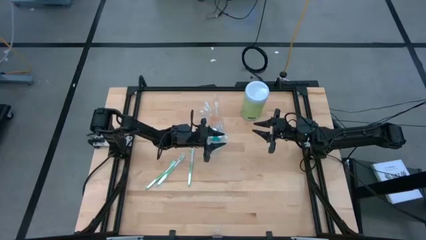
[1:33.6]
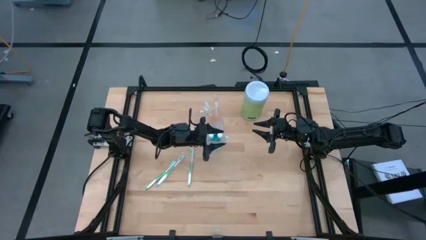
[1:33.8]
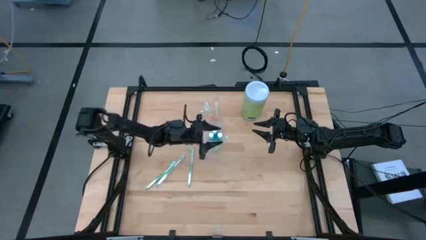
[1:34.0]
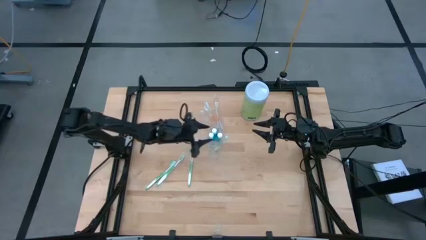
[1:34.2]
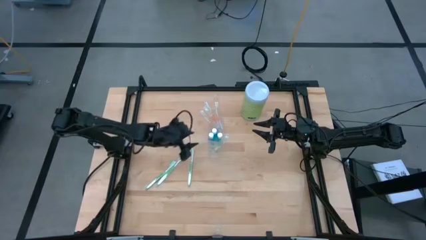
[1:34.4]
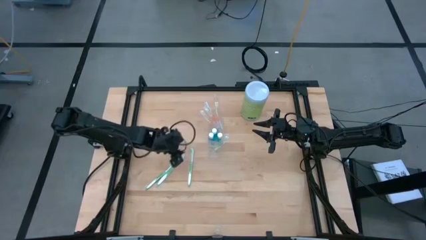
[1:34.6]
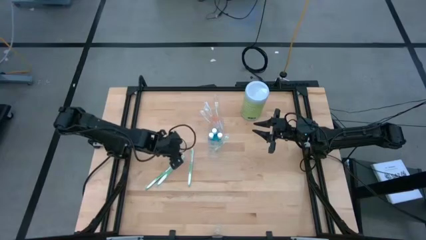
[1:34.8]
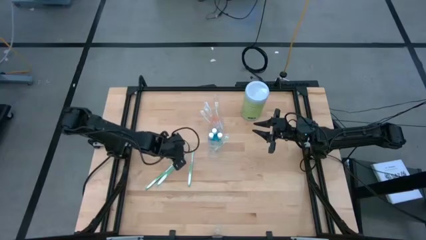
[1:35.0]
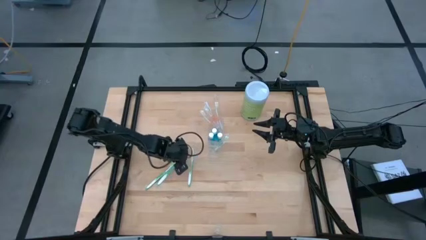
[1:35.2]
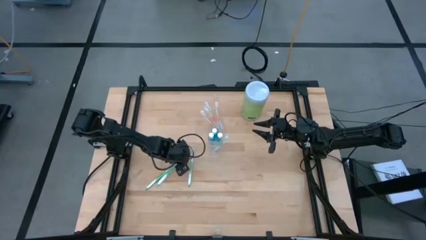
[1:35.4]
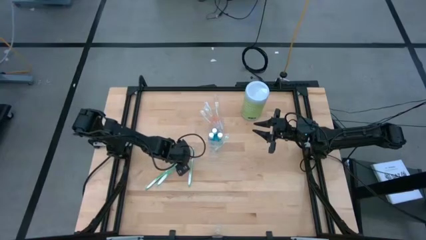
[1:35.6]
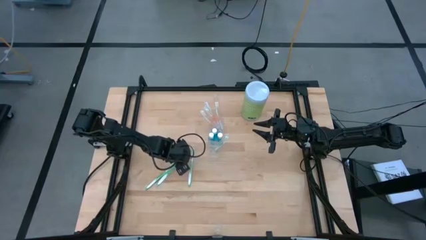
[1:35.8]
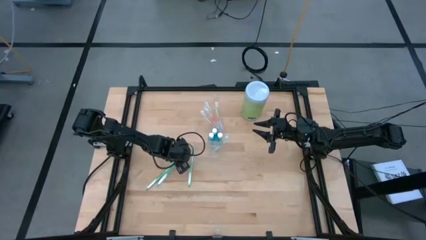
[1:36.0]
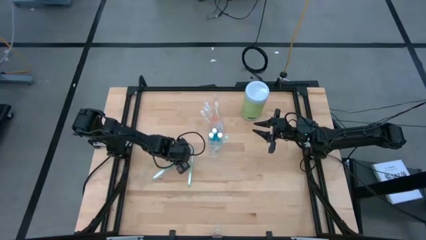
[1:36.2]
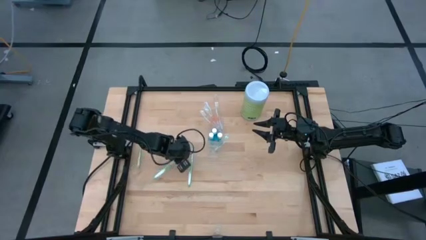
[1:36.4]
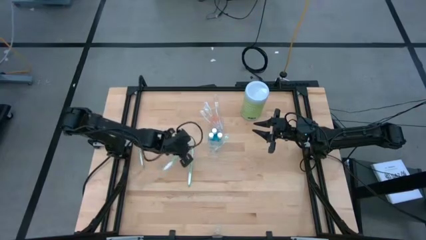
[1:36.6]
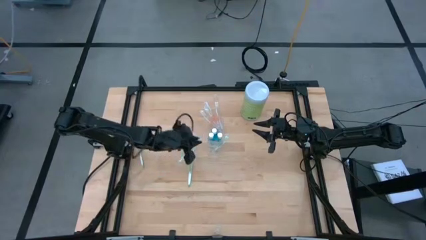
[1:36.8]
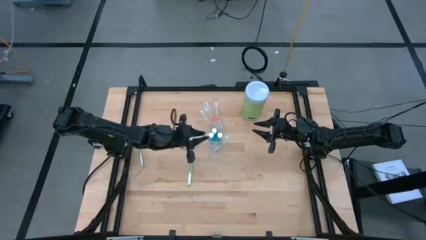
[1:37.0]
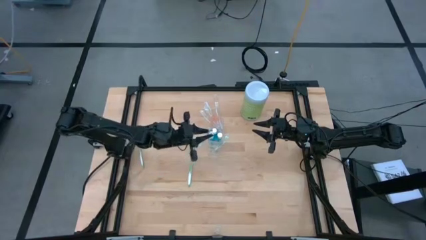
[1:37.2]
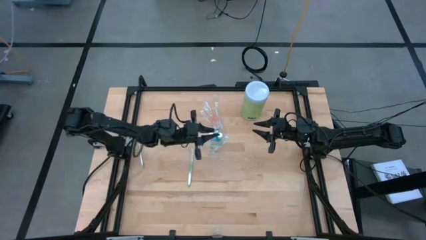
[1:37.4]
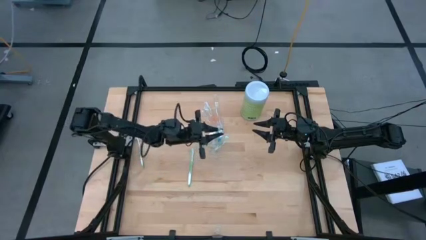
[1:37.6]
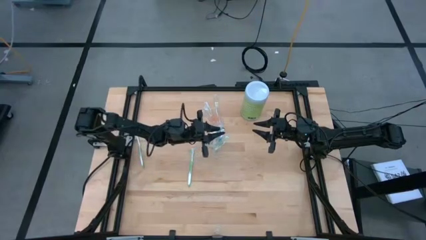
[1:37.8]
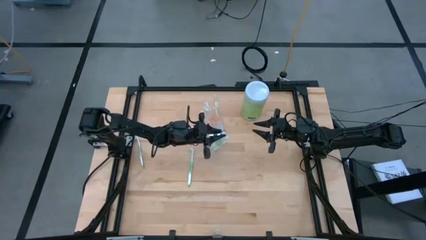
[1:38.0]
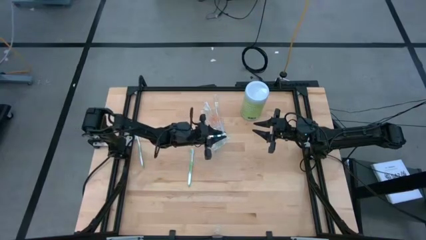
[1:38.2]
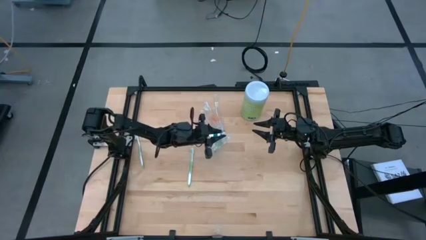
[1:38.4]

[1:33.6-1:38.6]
Task: Pick & Place toothbrushing station
Put the green toothbrush with the other green toothbrush in the transparent organizer

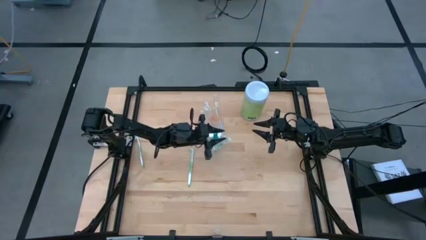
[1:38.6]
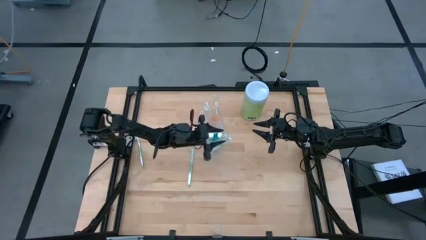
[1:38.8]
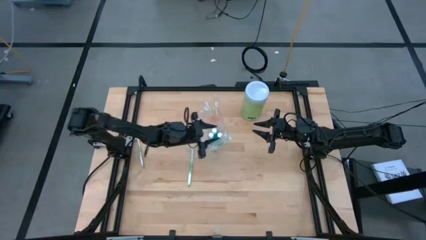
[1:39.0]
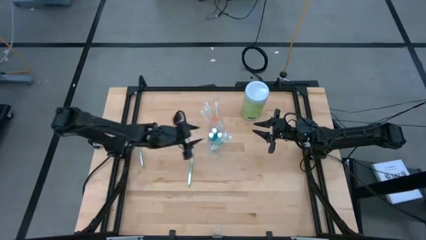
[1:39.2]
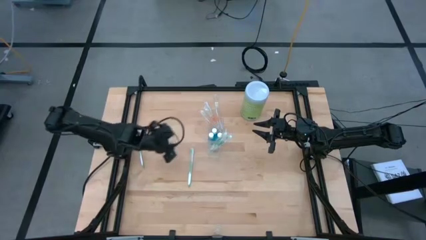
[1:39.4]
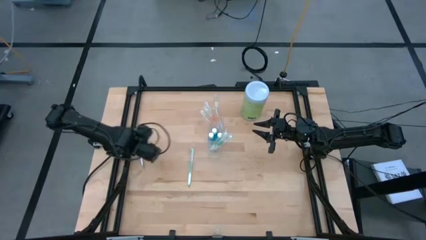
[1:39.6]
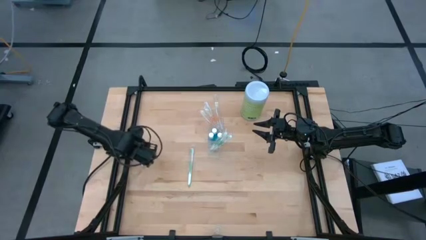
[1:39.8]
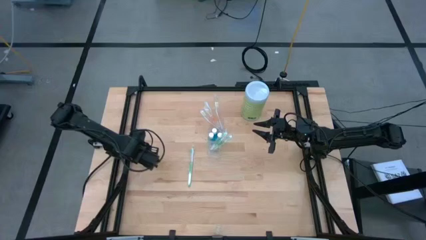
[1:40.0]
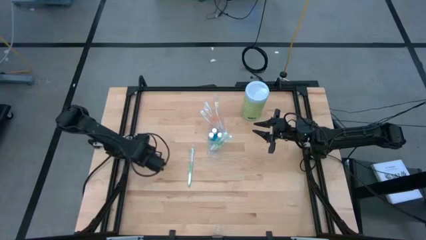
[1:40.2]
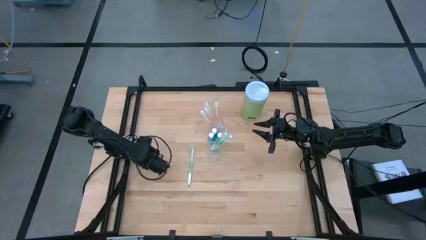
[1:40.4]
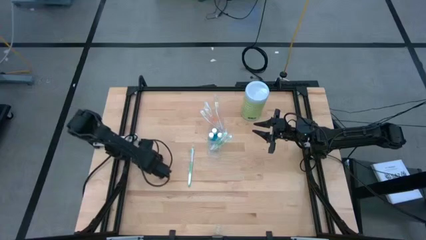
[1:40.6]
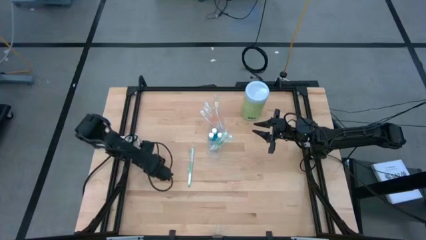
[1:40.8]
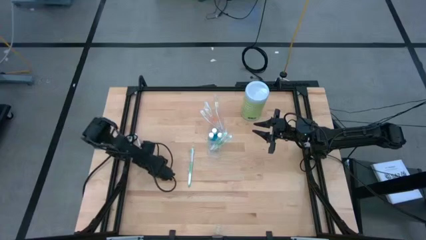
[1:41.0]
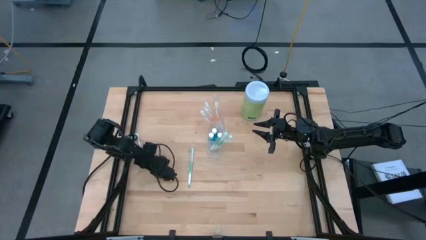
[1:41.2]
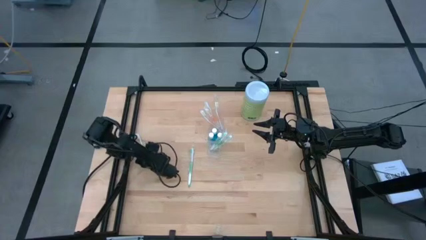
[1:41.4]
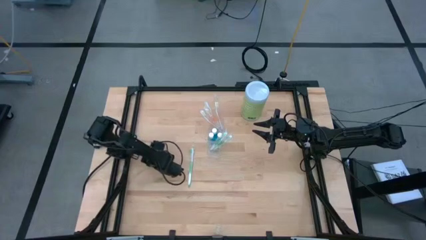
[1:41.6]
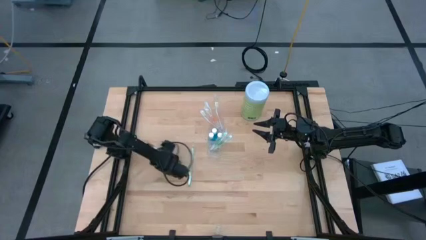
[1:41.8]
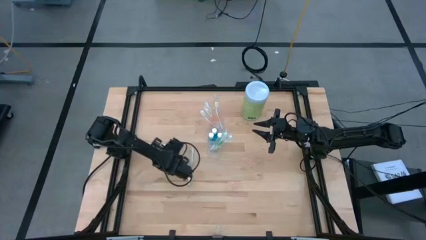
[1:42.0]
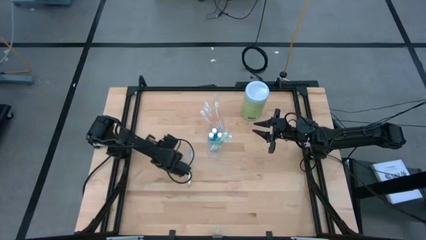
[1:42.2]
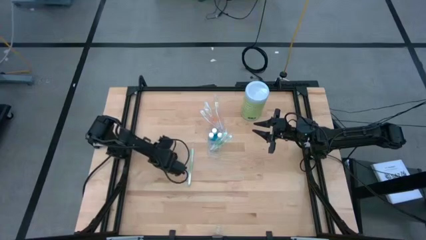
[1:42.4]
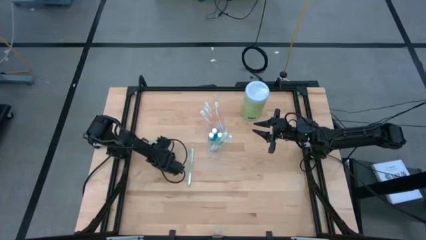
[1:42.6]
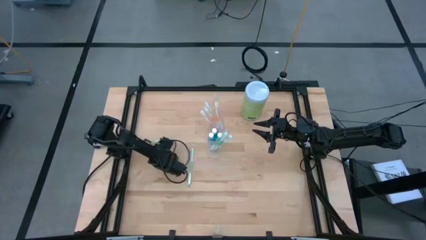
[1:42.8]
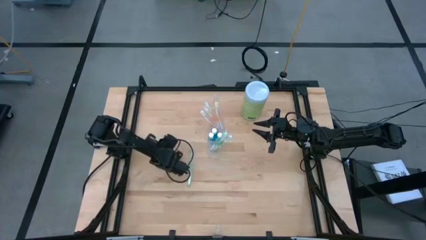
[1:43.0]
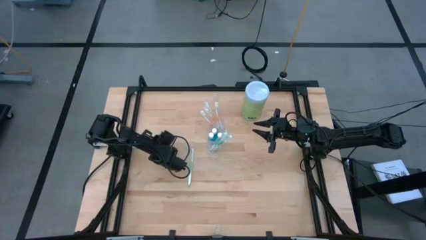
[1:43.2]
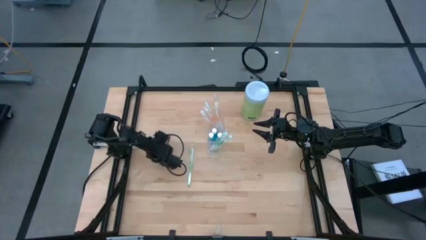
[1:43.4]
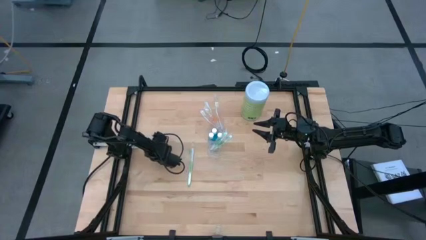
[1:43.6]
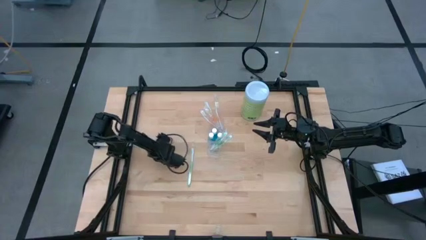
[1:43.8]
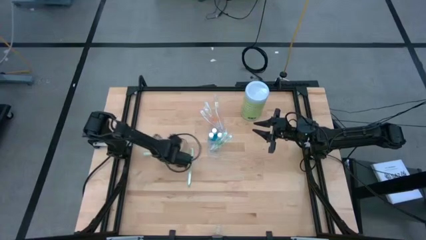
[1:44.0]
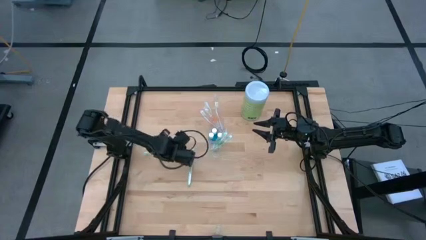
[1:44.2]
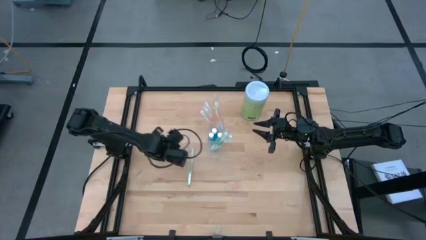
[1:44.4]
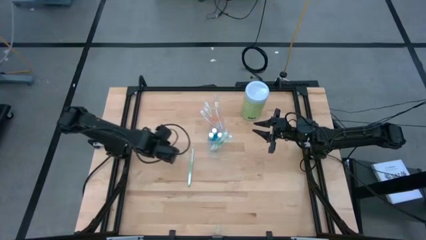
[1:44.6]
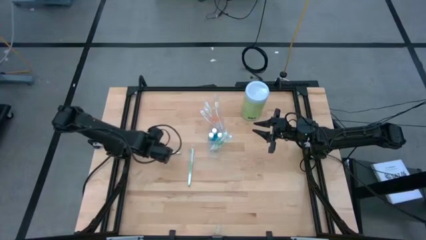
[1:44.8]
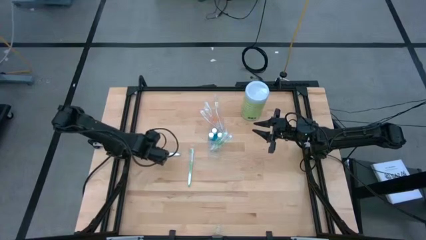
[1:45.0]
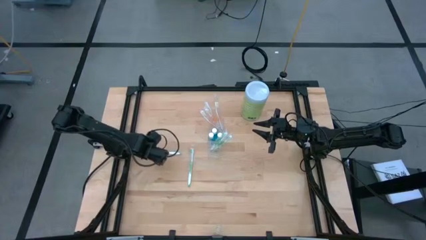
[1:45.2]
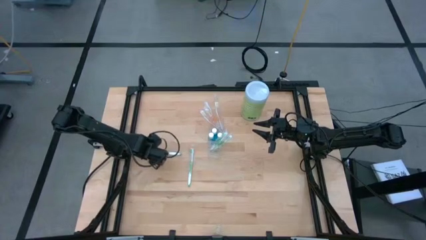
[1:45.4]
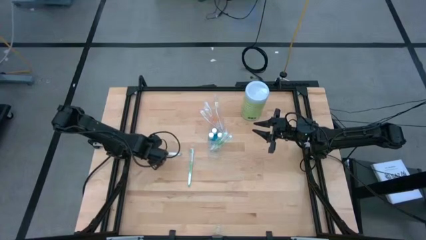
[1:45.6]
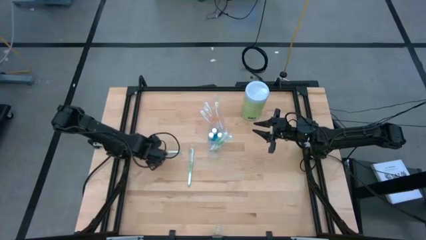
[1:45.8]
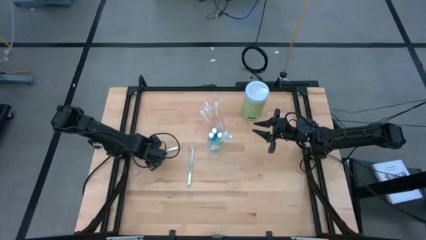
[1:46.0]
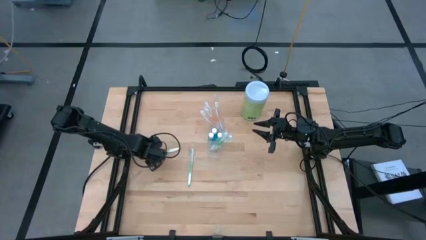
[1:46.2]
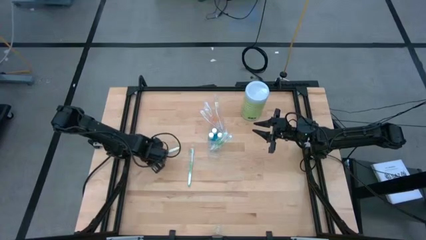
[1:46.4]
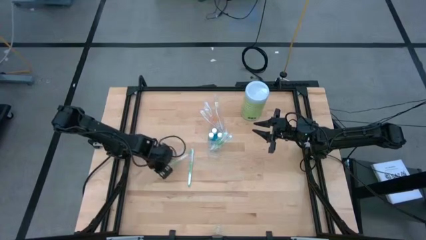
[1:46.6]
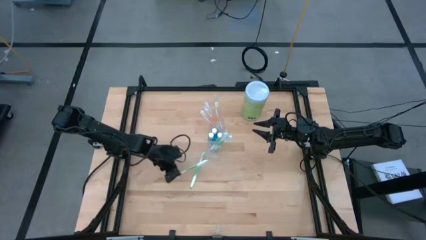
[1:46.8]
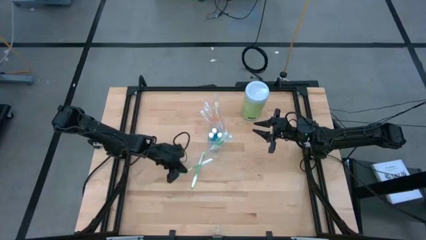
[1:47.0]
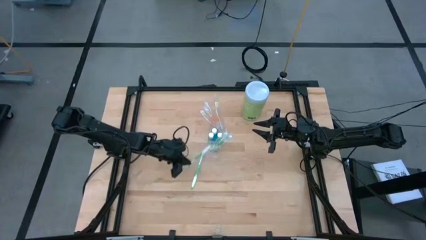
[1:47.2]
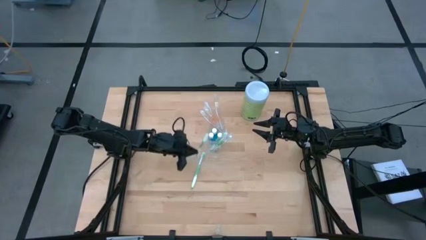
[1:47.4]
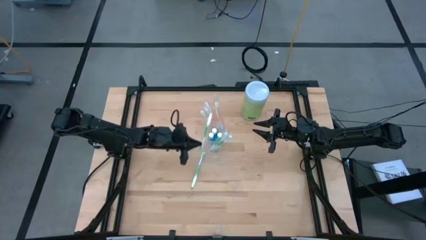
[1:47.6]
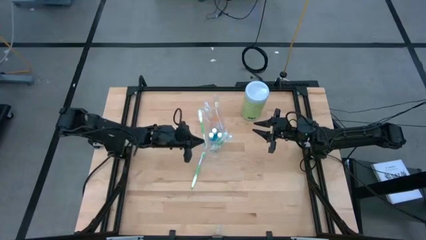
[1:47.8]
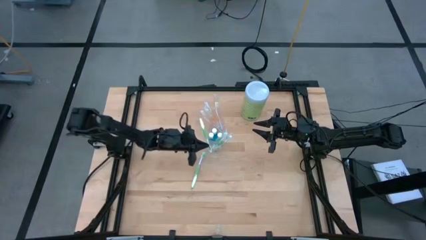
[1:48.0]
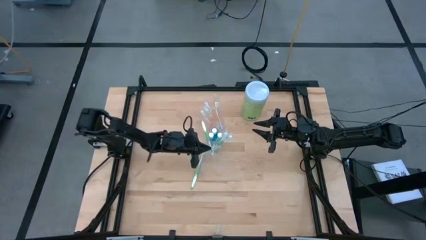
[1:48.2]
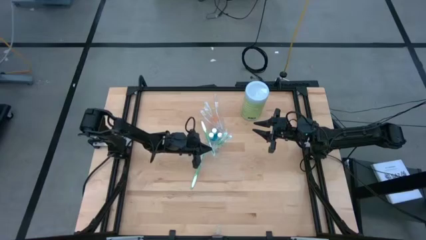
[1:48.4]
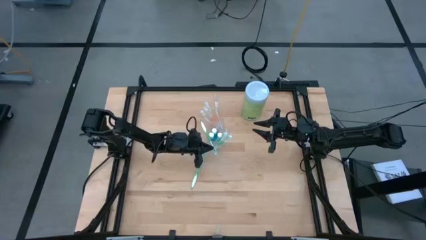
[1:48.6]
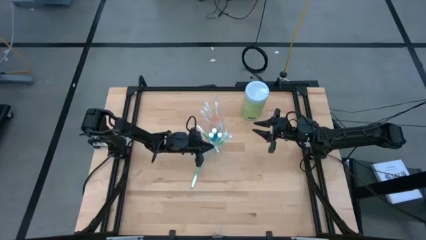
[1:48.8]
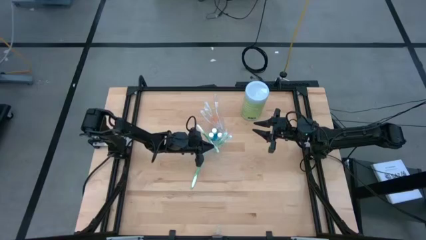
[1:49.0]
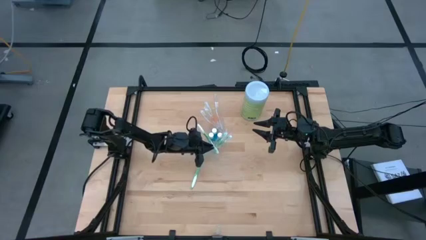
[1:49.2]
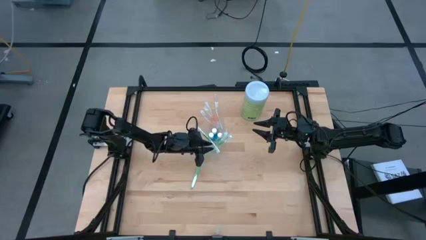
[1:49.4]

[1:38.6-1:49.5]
Put the green toothbrush with the other green toothbrushes in the transparent organizer

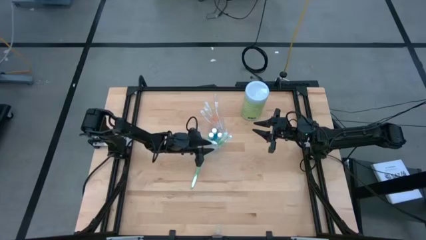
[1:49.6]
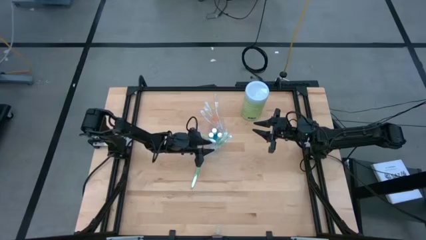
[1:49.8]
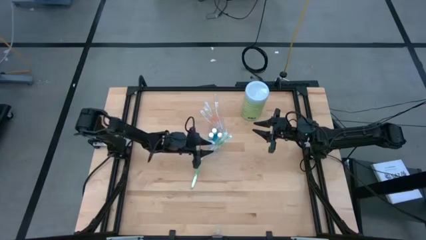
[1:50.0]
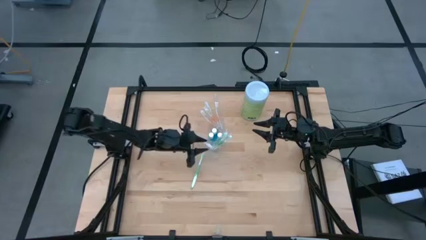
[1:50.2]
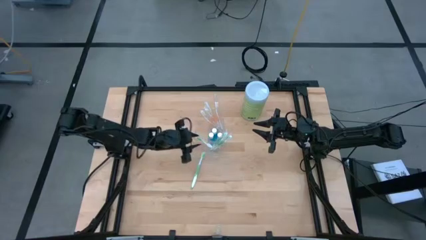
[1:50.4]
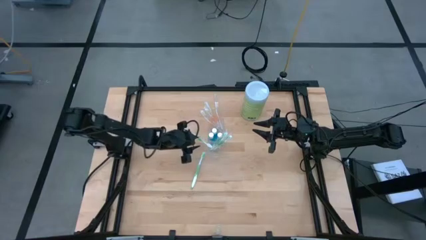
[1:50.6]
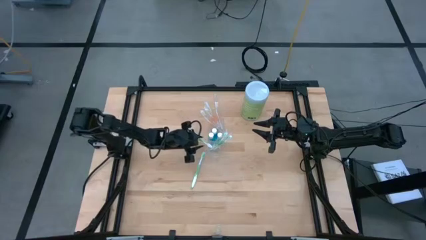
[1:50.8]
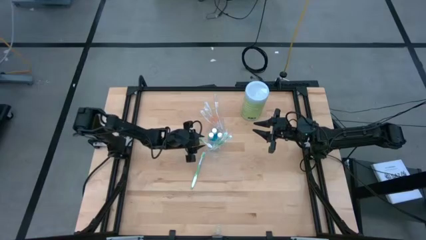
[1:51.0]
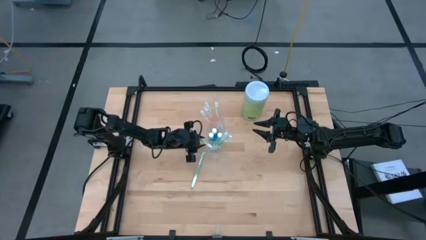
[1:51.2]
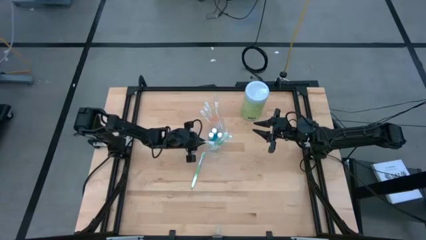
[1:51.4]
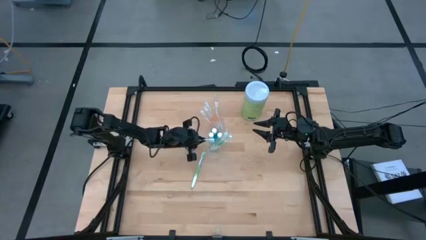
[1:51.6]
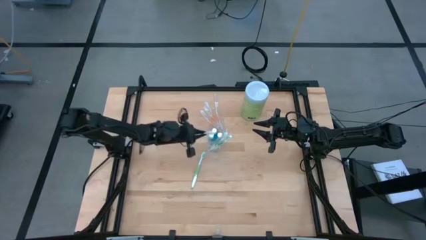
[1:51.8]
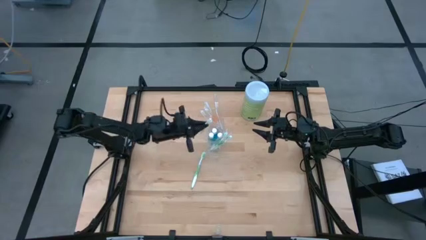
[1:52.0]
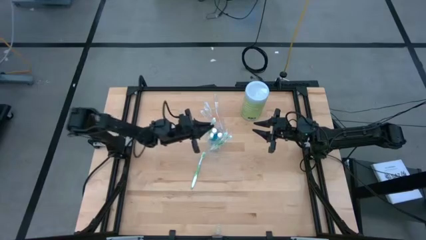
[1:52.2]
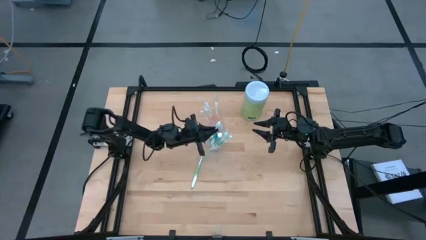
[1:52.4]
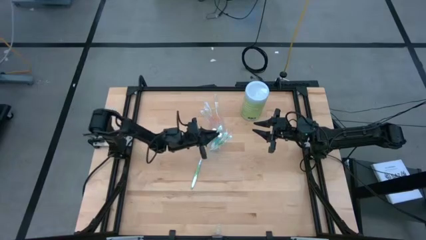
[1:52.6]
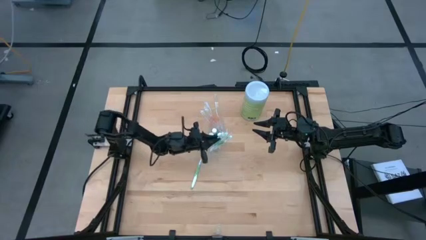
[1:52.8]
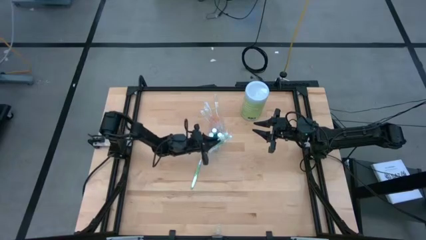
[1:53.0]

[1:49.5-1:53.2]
Put the green toothbrush with the other green toothbrush in the transparent organizer
